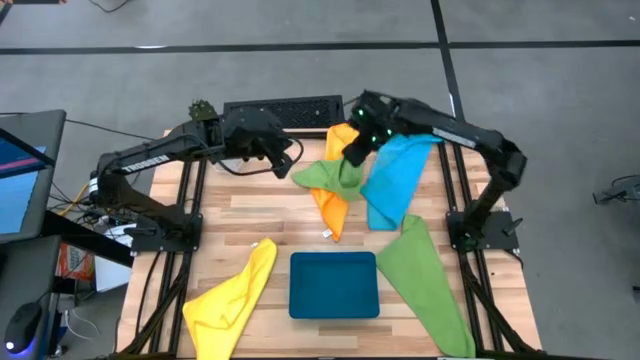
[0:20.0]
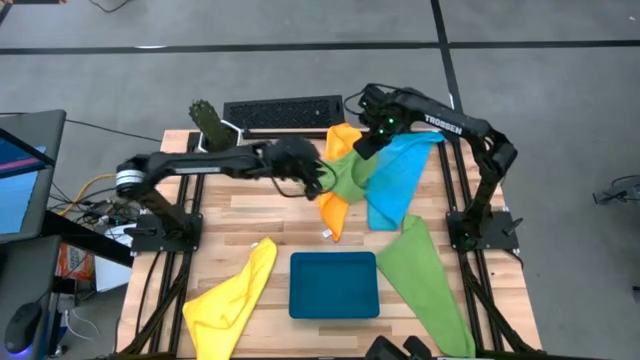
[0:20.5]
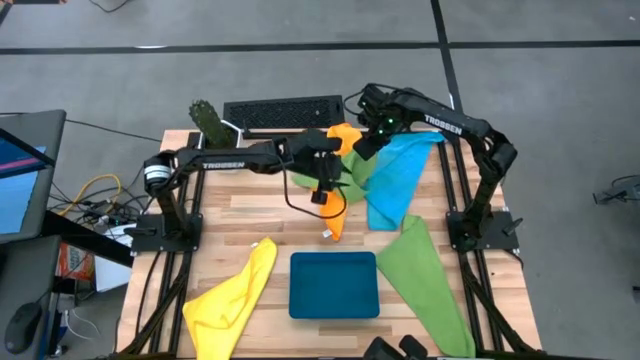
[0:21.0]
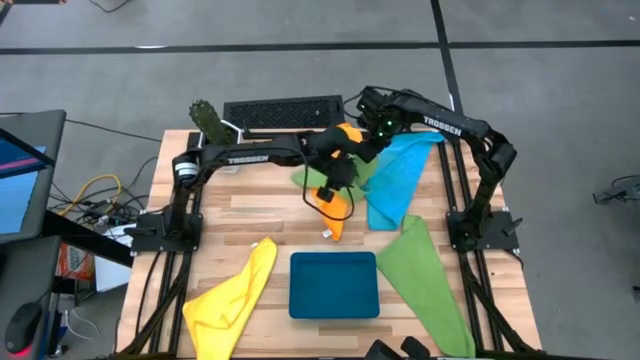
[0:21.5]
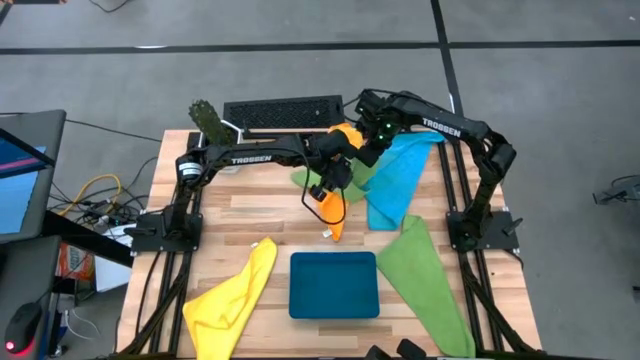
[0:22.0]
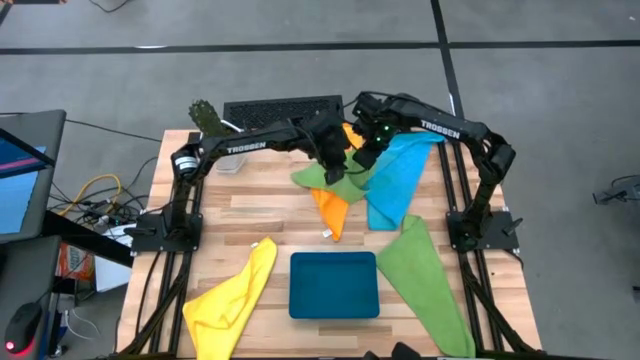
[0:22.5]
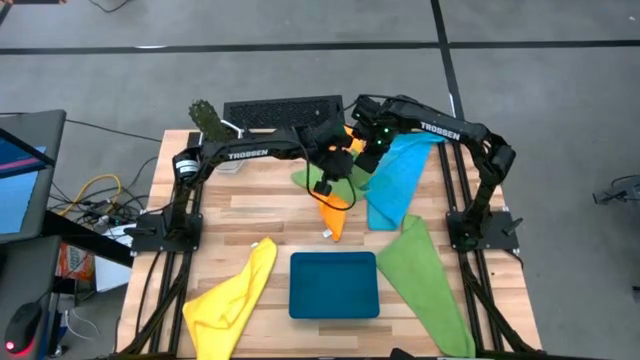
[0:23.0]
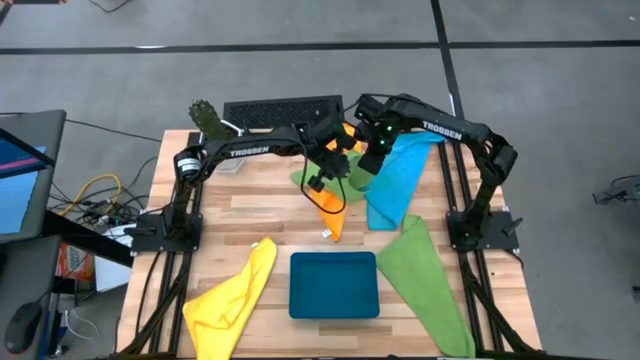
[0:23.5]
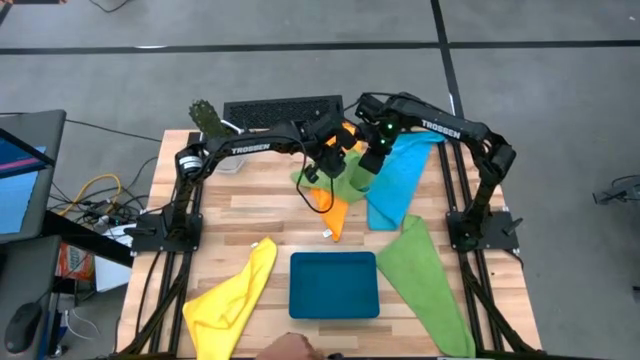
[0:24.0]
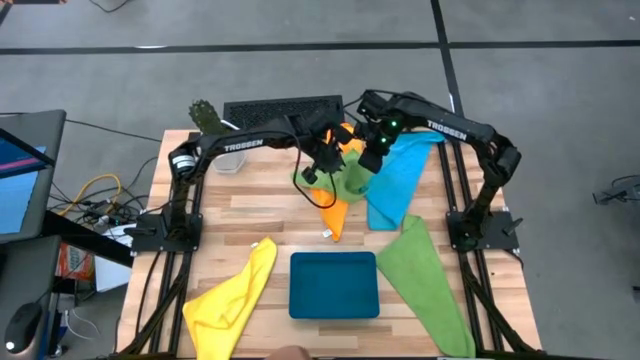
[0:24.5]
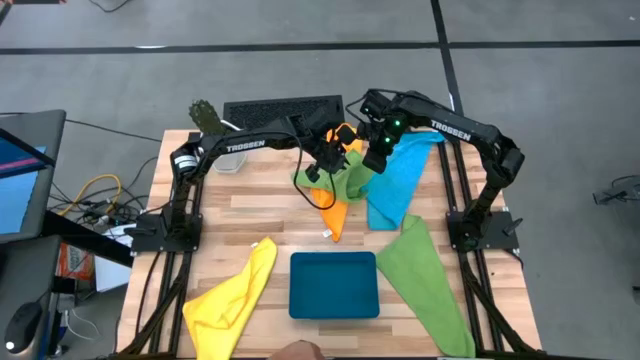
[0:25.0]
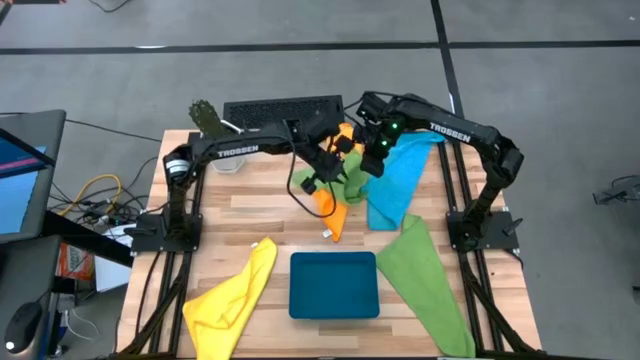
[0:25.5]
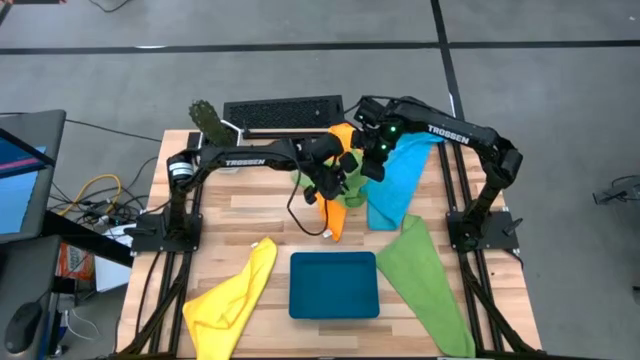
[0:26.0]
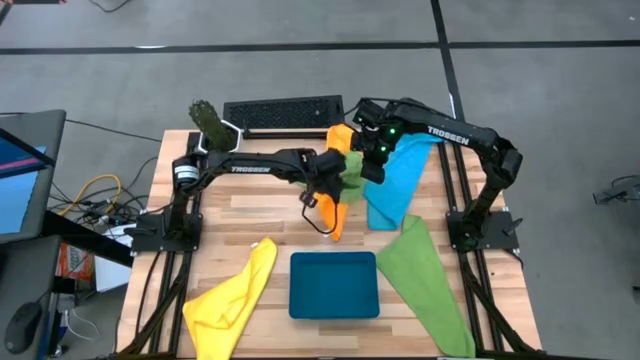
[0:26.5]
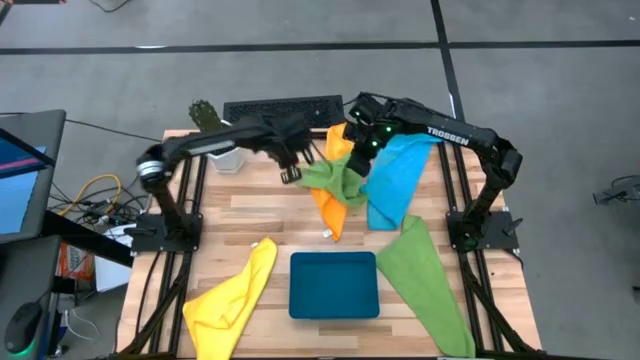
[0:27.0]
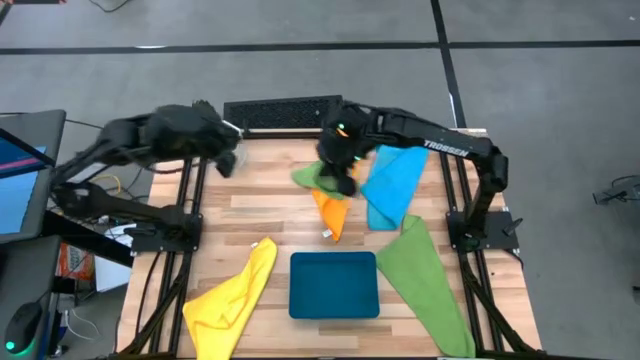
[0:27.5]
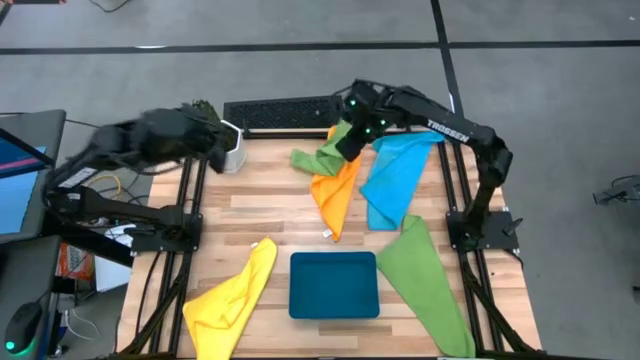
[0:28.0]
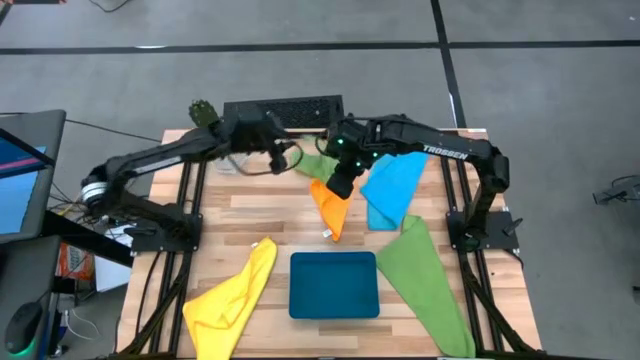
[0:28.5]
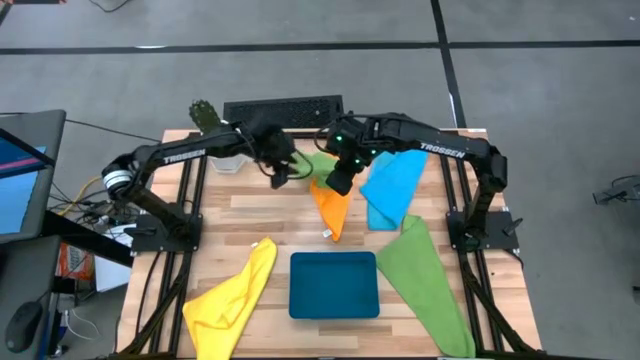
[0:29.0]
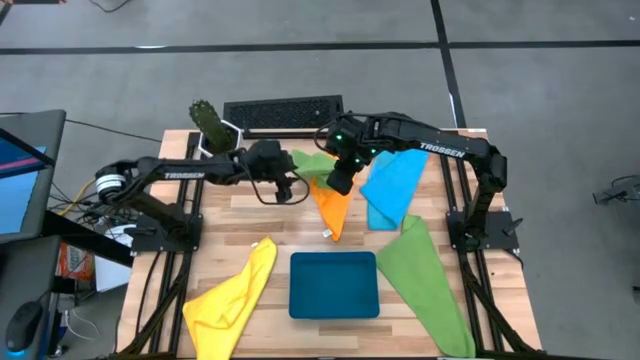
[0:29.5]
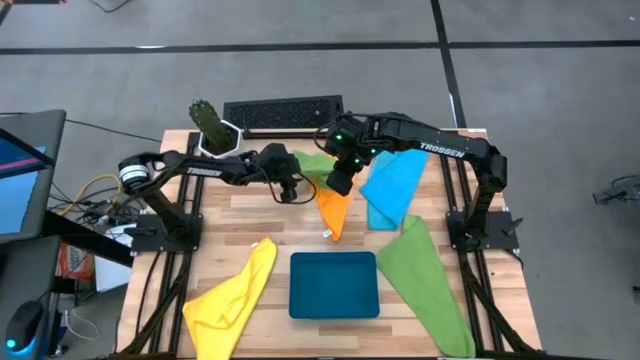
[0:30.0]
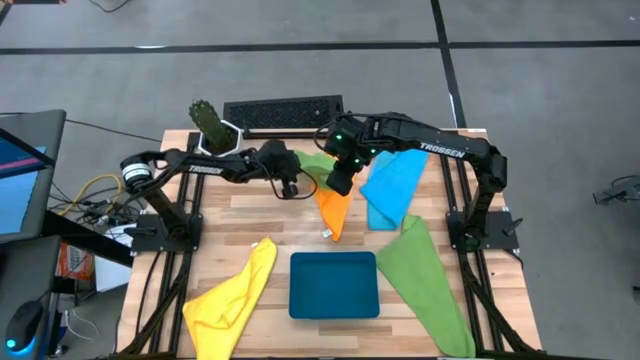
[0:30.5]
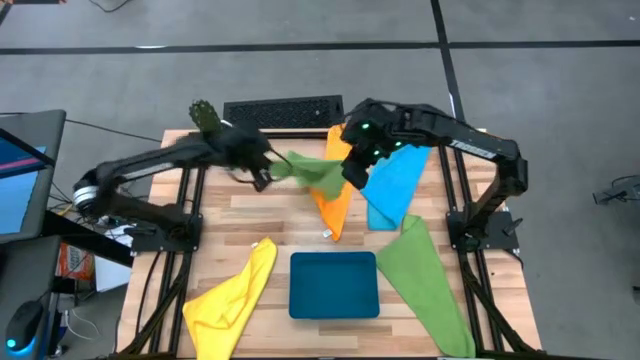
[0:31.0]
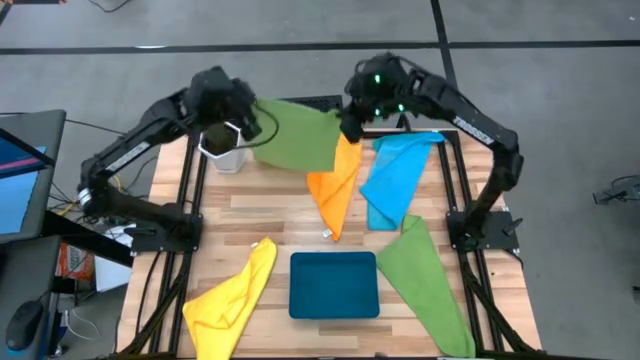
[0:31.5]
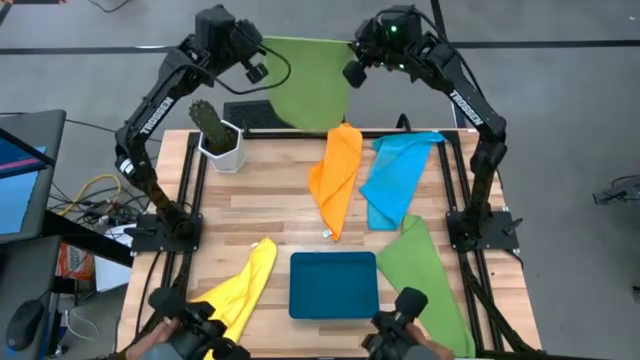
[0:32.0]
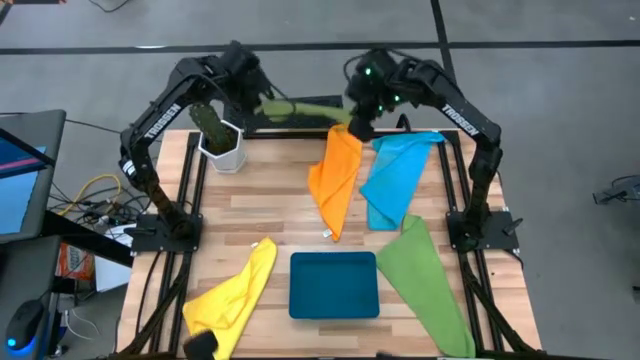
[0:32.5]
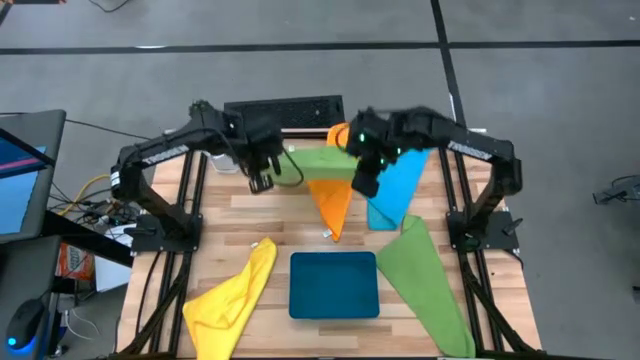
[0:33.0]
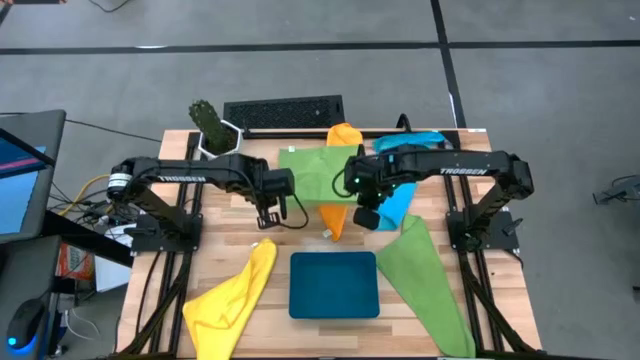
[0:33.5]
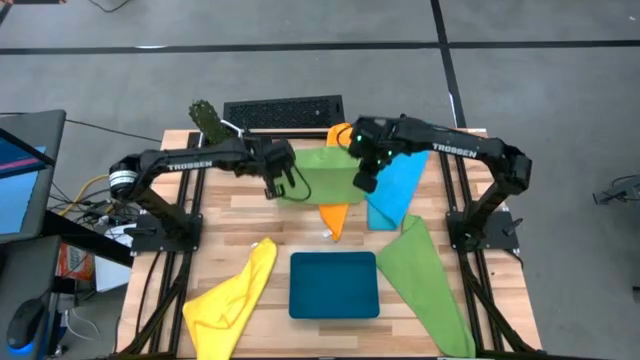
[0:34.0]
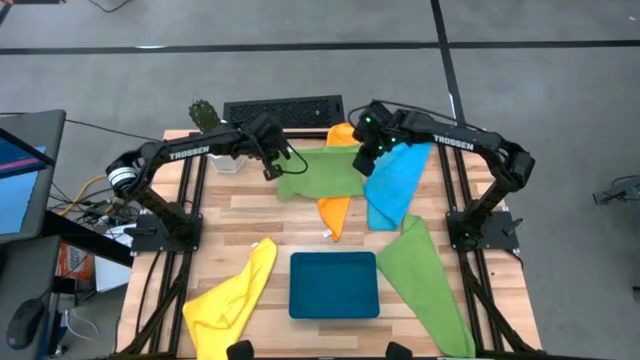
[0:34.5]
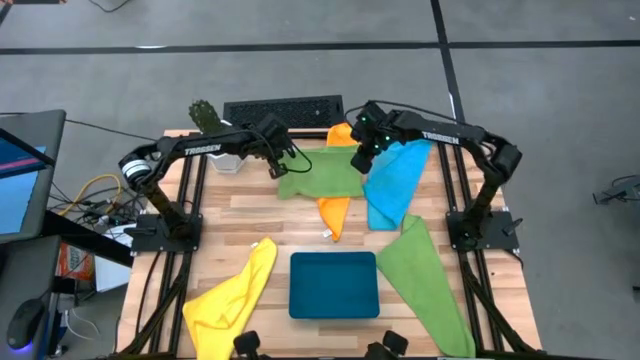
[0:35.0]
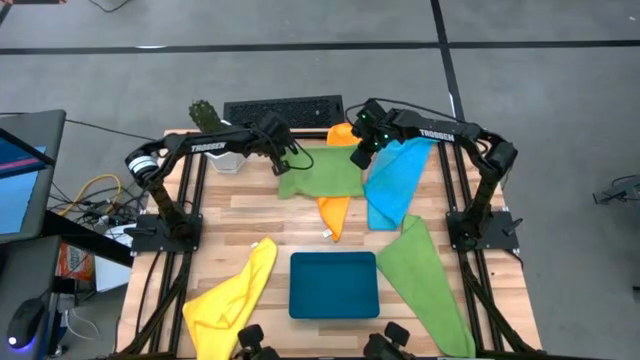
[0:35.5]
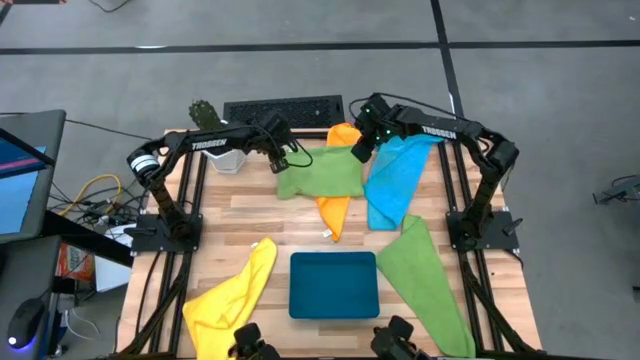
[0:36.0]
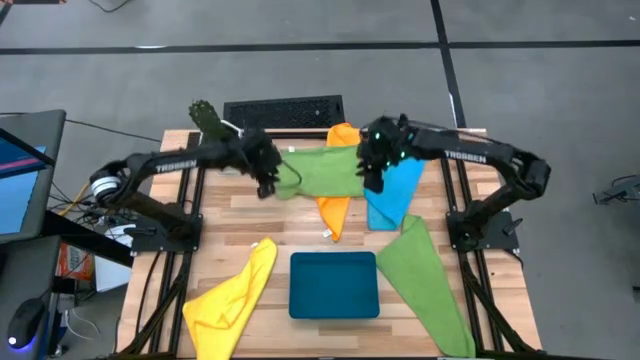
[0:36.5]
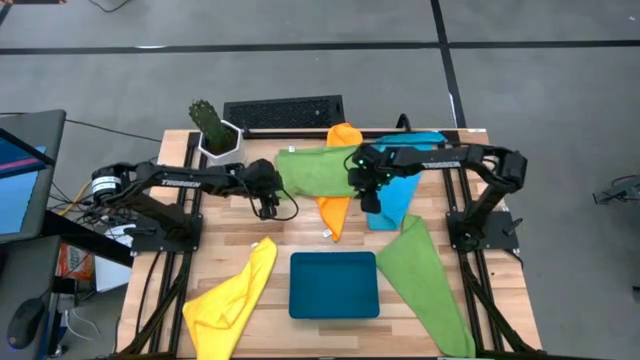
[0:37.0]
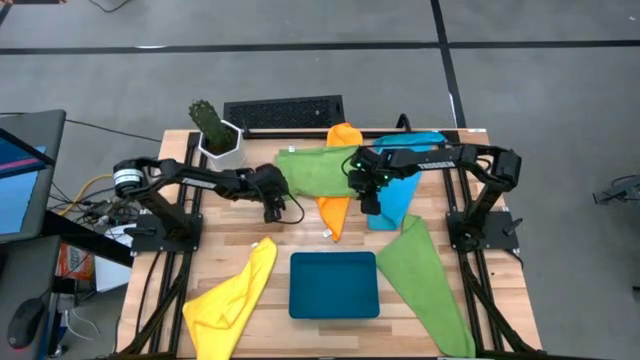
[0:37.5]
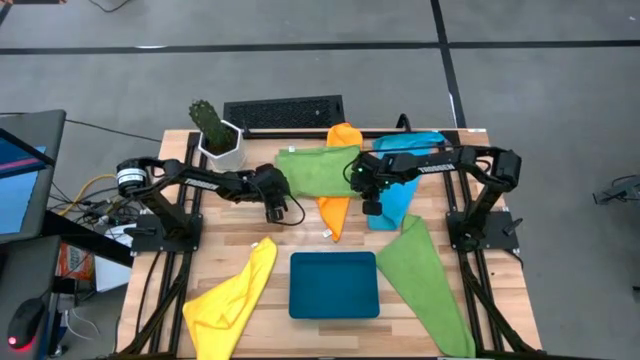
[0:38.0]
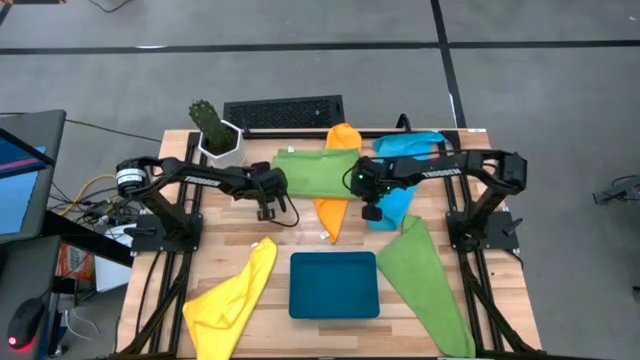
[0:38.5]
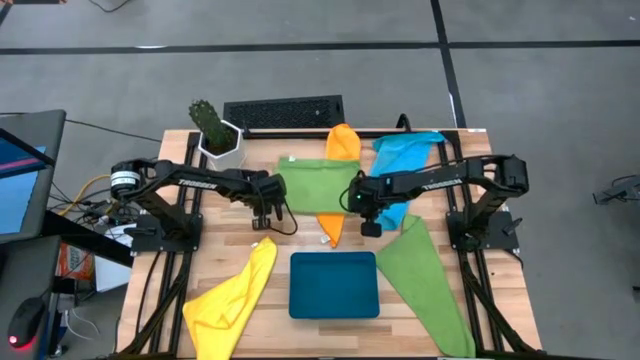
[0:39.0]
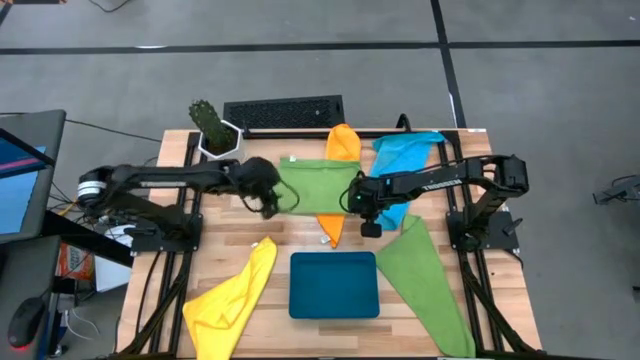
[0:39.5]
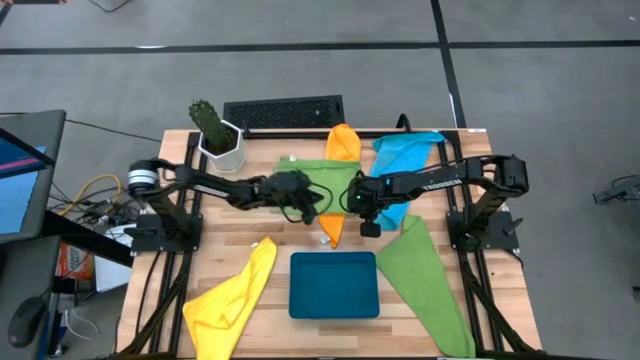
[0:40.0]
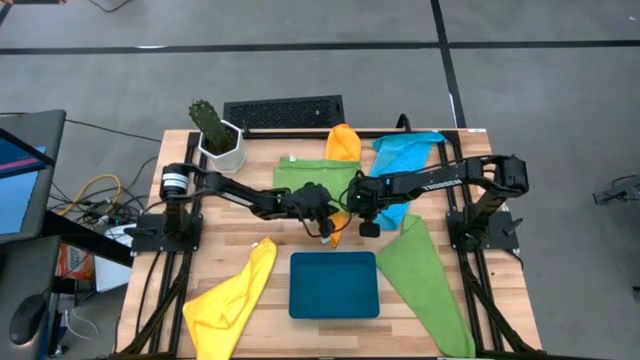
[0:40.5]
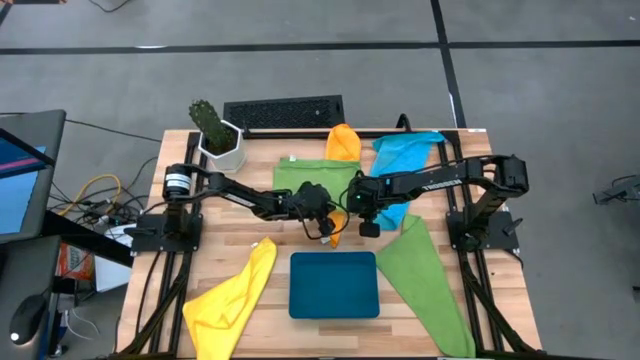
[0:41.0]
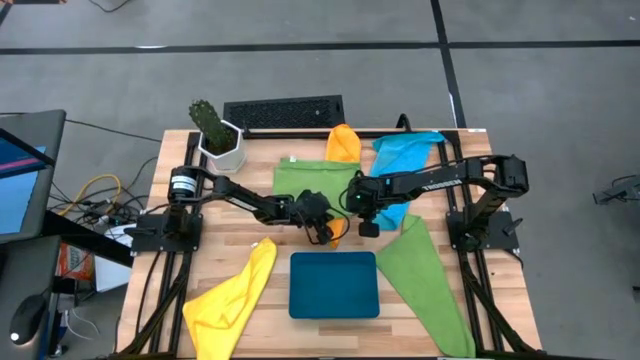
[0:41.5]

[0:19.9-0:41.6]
Task: Fold microfiber towels
Fold the top green microfiber towel
